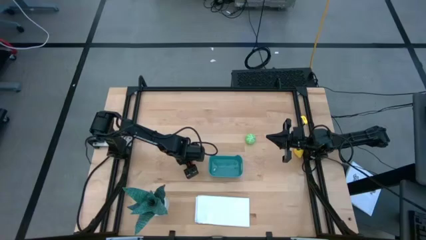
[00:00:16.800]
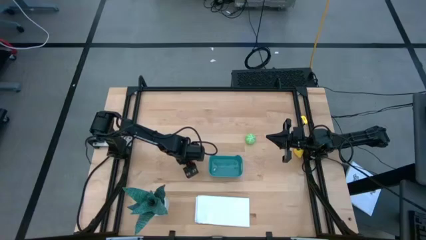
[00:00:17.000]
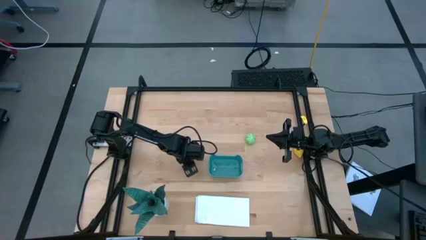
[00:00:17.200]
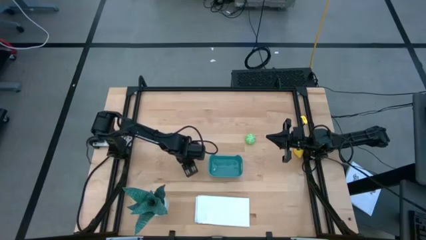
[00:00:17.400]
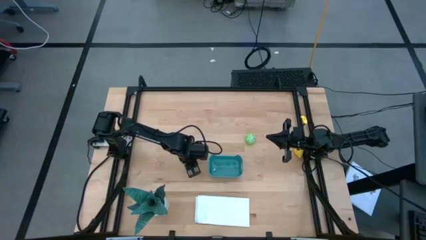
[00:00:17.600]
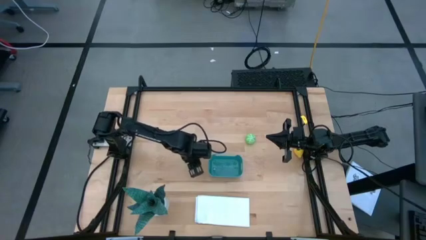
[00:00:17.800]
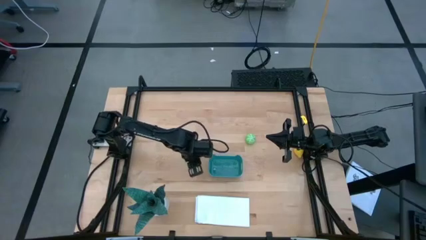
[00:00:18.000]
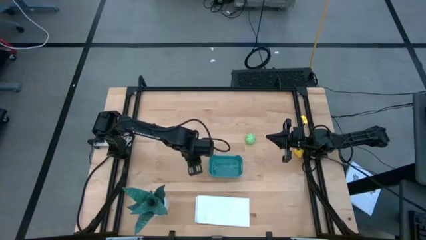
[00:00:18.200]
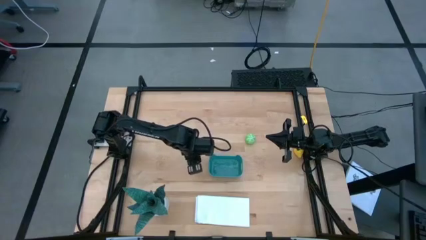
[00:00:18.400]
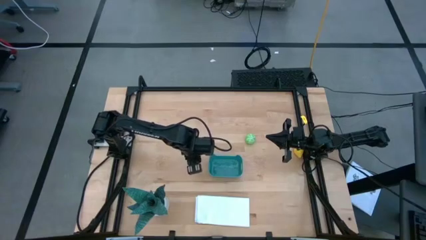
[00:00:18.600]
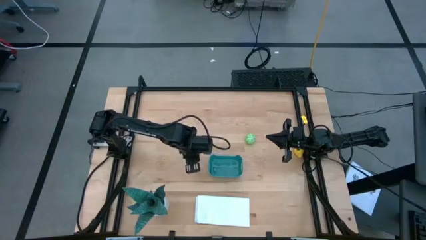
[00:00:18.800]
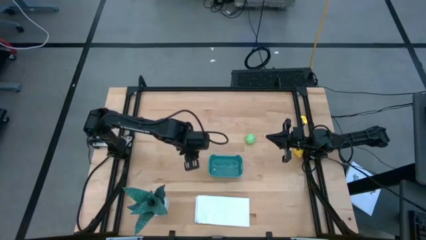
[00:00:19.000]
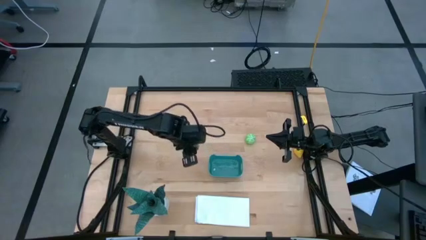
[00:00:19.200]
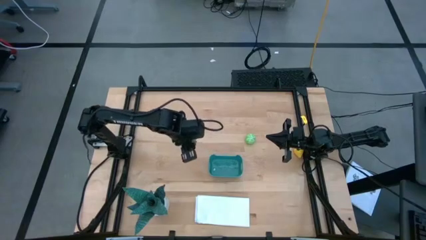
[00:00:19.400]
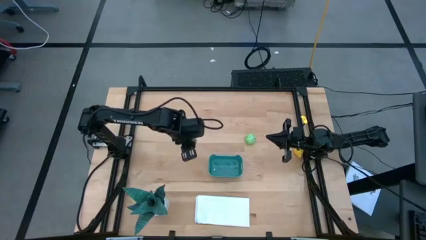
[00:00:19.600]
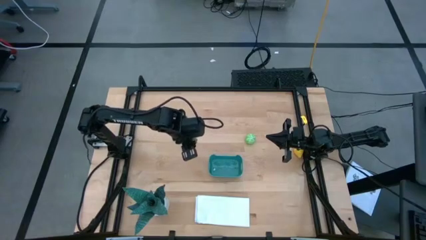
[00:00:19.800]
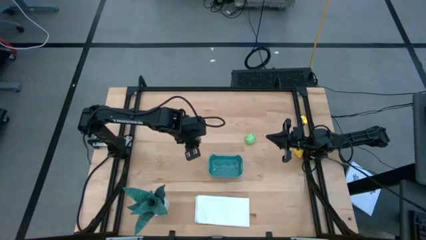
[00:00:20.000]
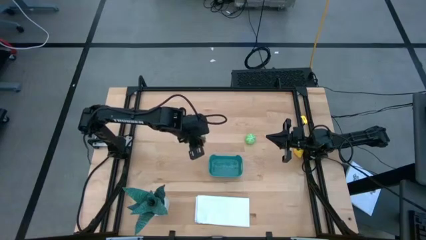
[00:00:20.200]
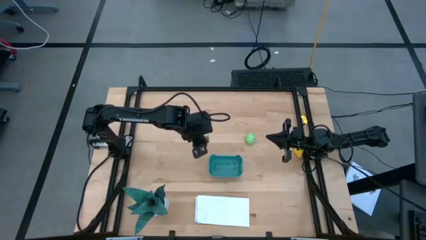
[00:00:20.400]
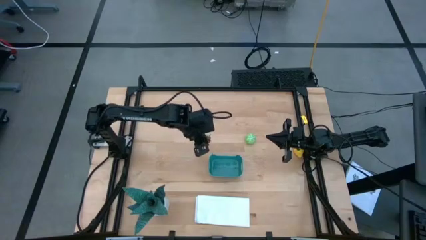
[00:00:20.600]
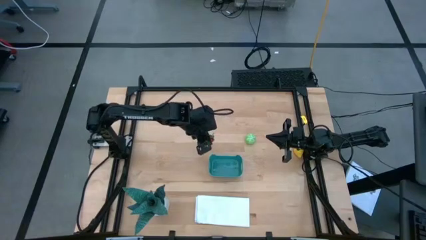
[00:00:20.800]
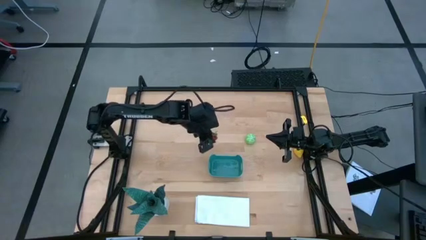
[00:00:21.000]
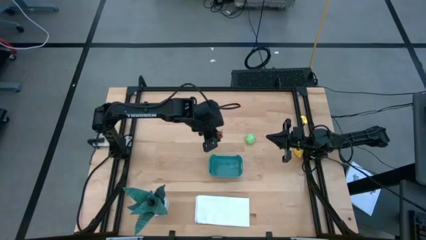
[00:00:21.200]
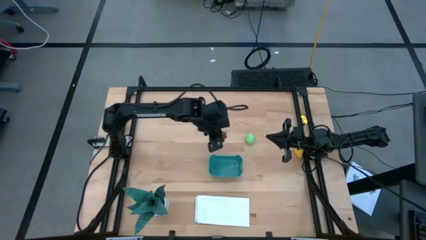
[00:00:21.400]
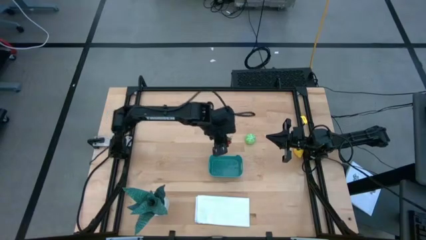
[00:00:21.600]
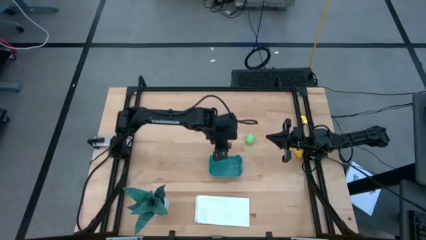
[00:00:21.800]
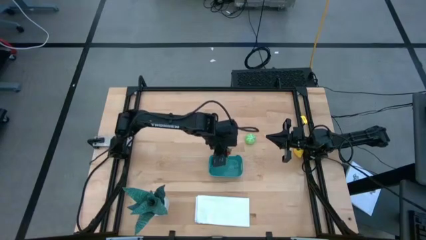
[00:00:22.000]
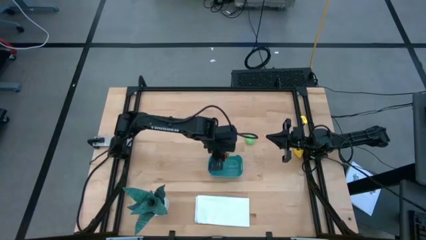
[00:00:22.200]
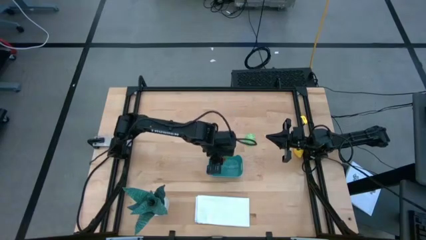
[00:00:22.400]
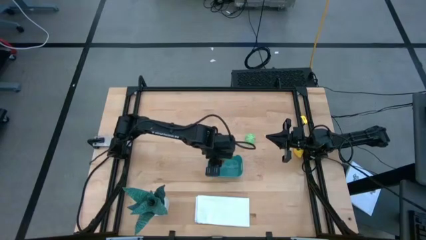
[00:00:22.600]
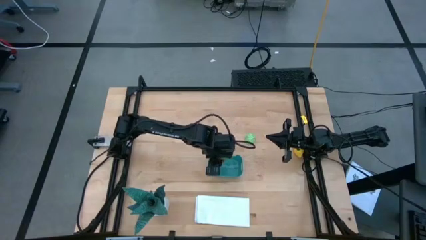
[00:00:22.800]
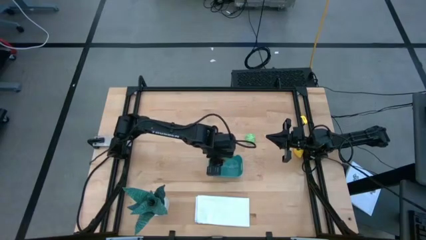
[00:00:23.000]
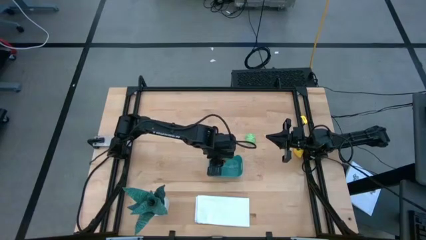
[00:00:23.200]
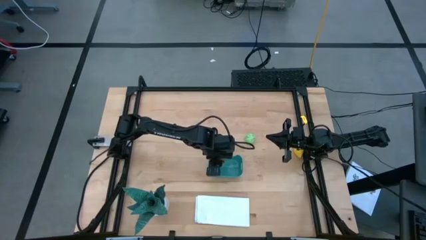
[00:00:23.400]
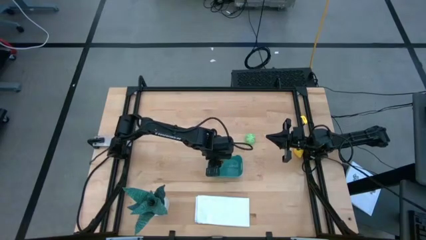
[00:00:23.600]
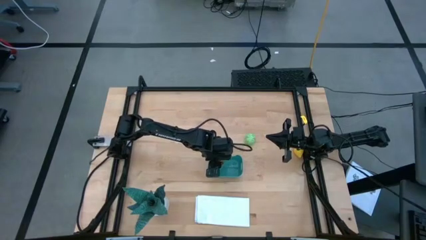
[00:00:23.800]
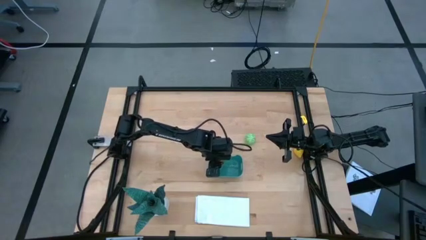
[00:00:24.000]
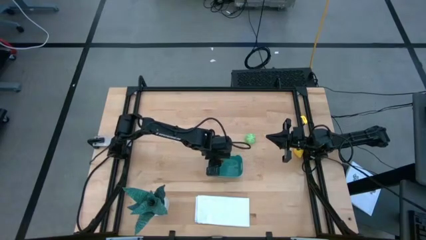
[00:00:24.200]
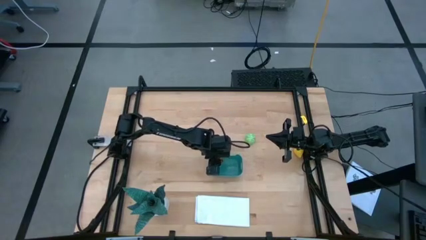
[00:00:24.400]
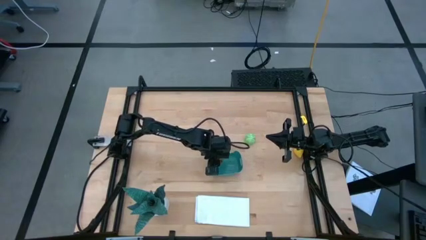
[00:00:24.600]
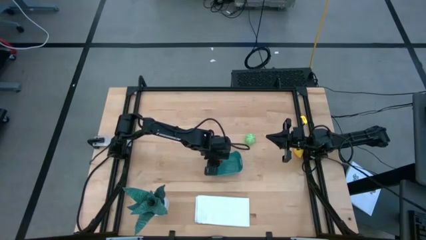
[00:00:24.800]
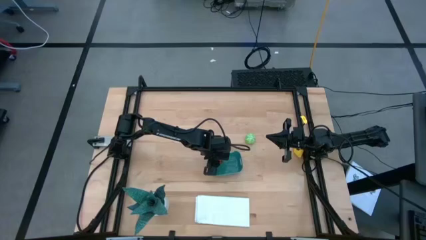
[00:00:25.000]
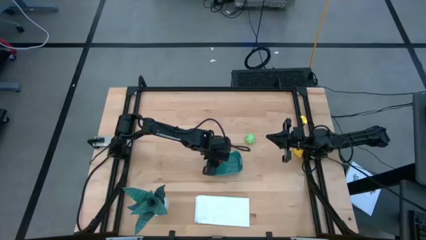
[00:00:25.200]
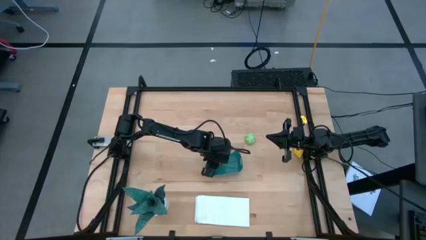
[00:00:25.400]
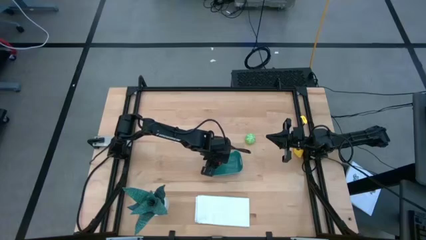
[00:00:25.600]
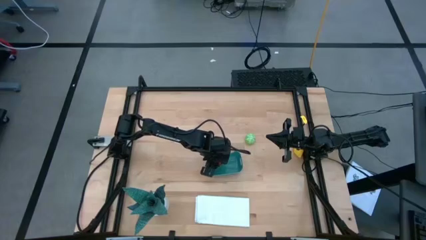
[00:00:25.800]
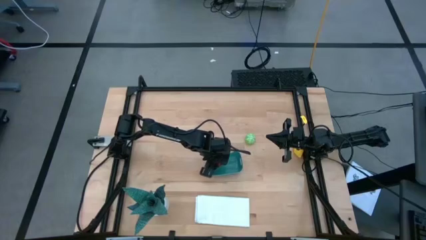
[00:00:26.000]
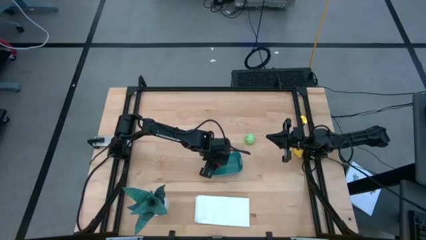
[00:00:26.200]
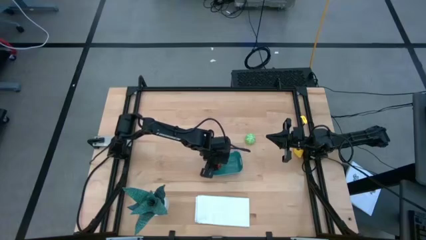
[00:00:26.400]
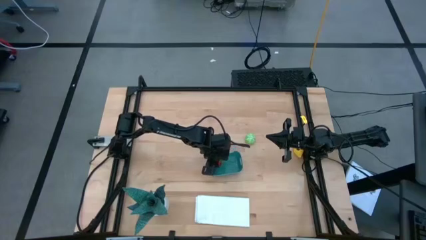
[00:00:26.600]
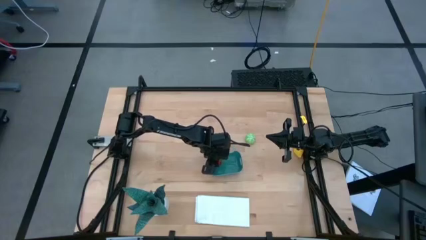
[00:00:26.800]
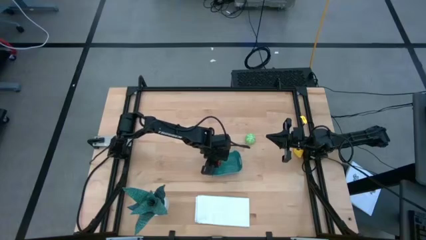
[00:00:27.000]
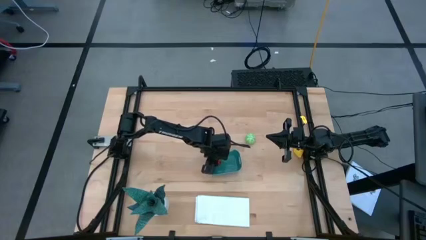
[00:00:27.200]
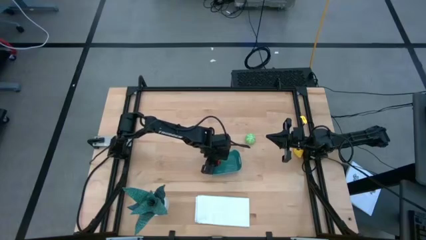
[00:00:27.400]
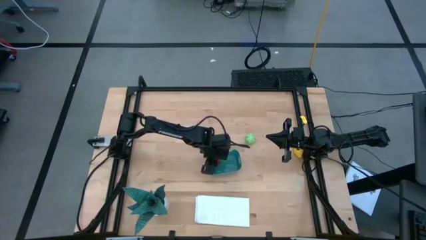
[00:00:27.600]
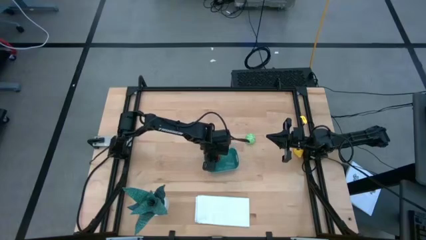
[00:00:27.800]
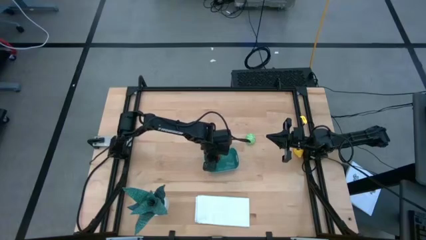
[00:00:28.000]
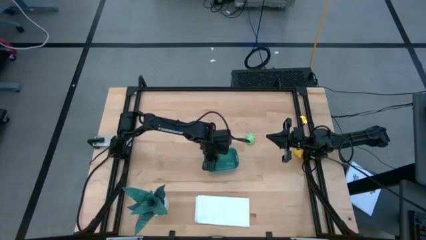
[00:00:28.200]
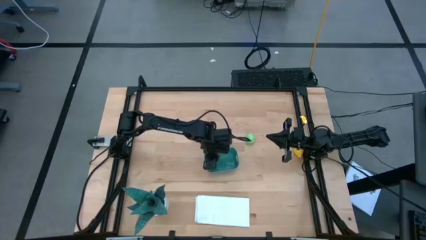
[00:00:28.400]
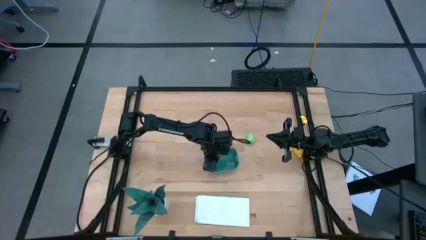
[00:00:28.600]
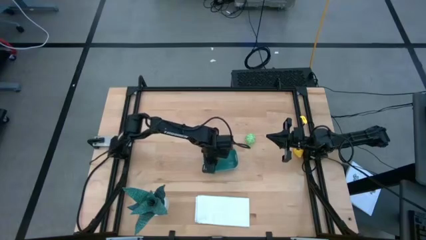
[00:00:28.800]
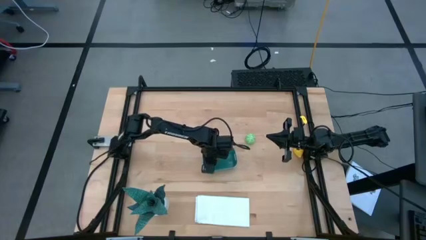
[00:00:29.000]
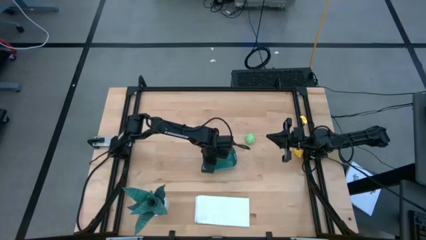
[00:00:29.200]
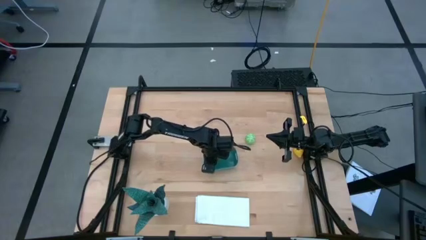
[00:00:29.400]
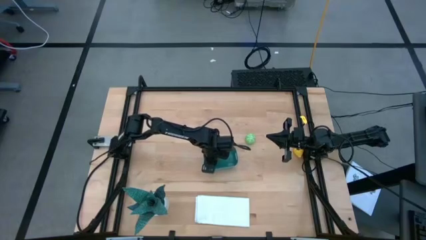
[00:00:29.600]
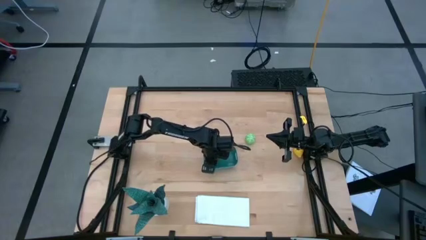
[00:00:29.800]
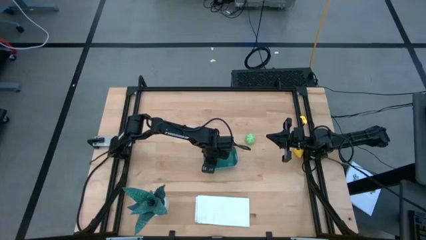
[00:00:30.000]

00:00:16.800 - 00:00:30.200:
Task: Pick and placing Produce into tupperware
Put the red strawberry into the blue bin
